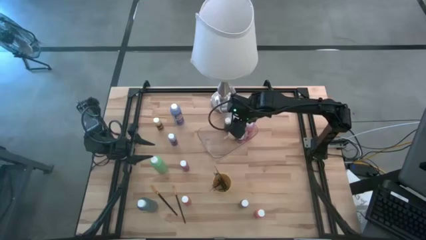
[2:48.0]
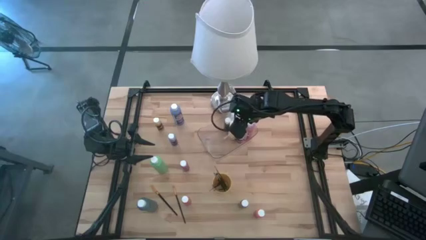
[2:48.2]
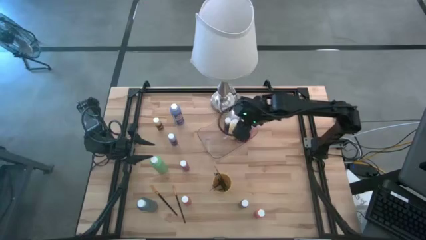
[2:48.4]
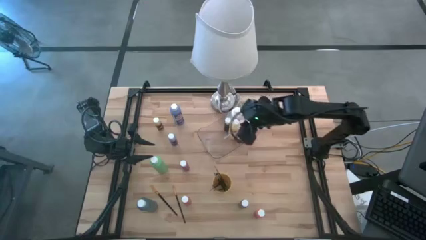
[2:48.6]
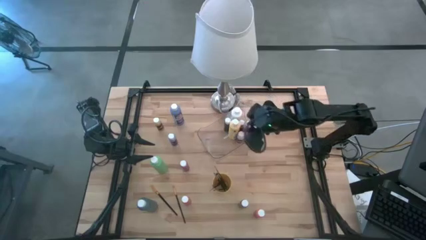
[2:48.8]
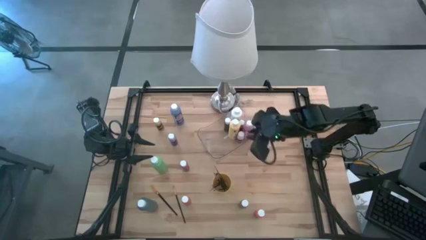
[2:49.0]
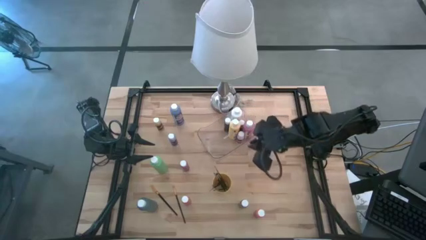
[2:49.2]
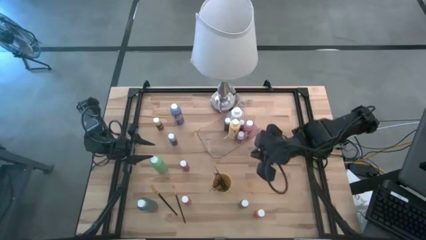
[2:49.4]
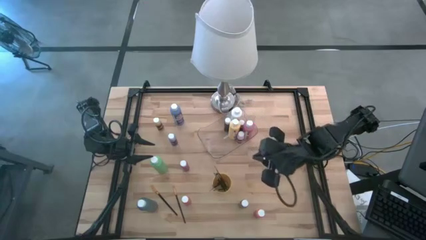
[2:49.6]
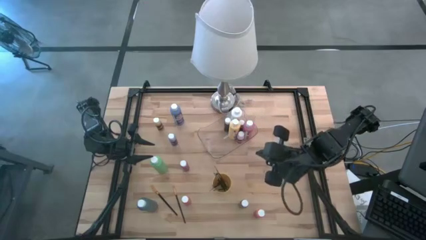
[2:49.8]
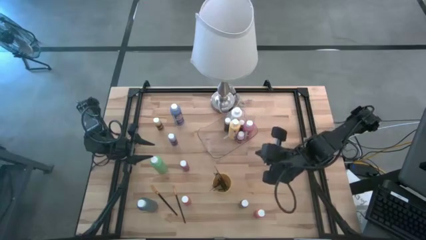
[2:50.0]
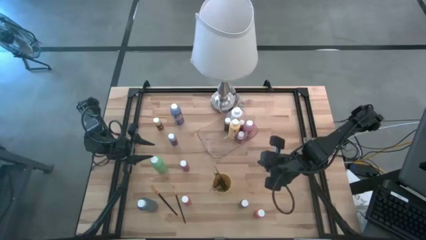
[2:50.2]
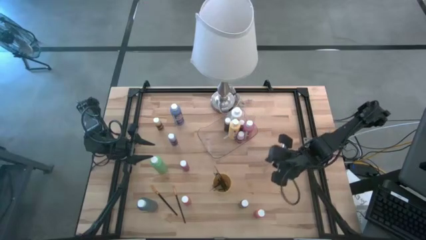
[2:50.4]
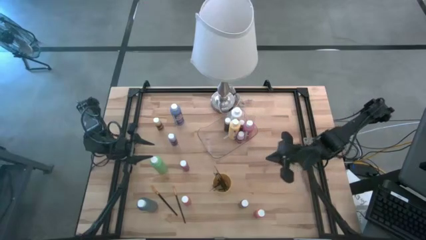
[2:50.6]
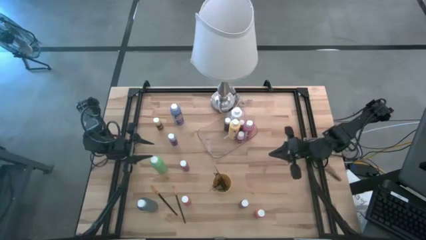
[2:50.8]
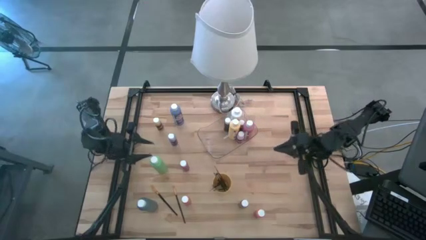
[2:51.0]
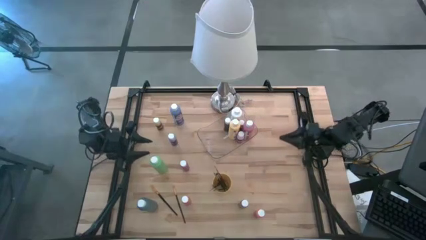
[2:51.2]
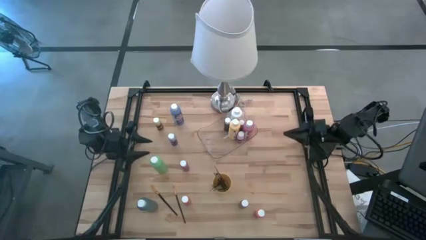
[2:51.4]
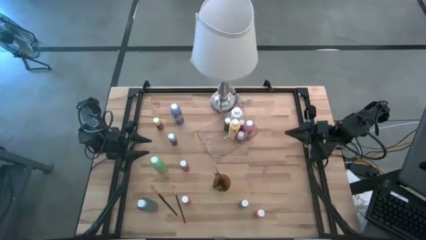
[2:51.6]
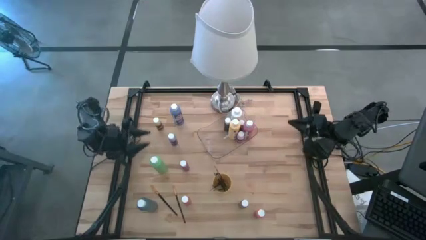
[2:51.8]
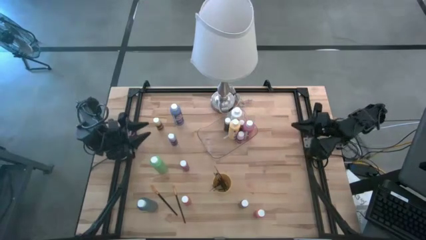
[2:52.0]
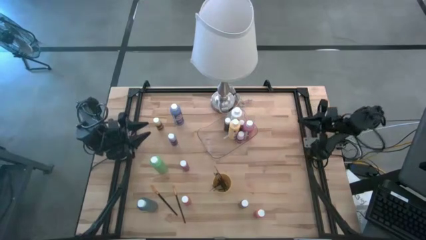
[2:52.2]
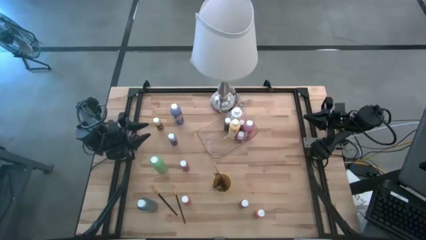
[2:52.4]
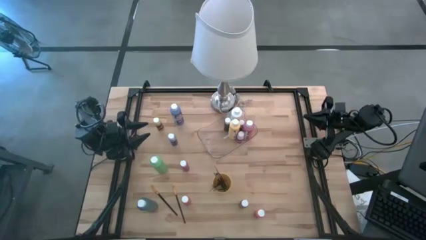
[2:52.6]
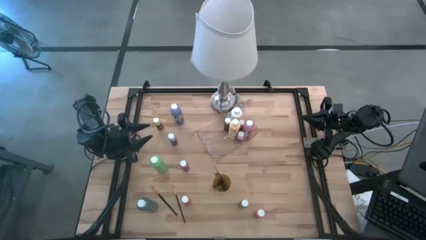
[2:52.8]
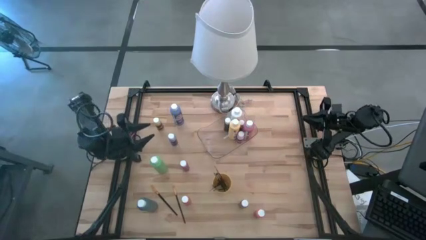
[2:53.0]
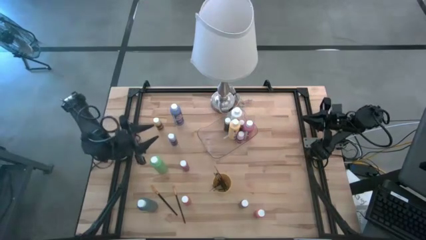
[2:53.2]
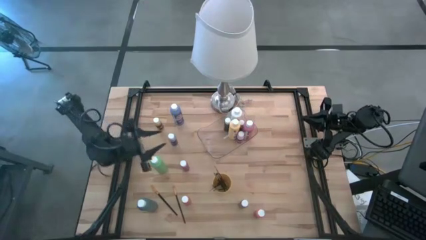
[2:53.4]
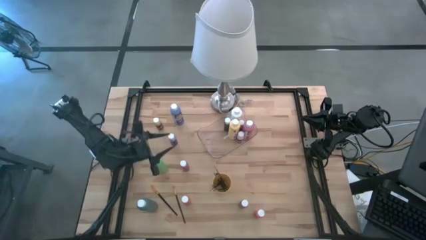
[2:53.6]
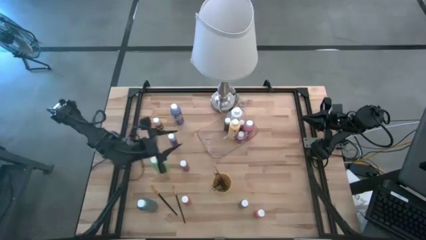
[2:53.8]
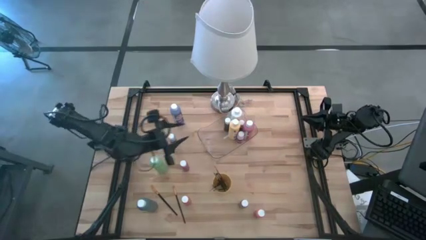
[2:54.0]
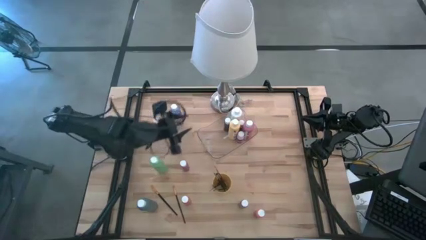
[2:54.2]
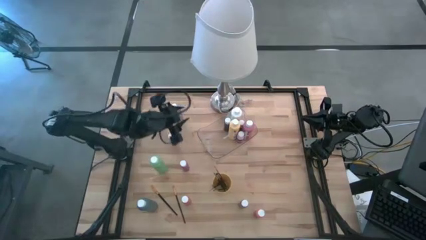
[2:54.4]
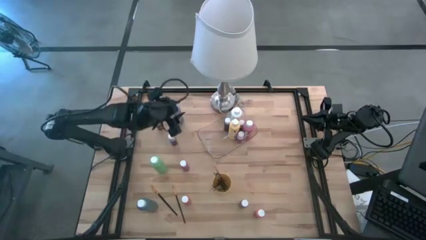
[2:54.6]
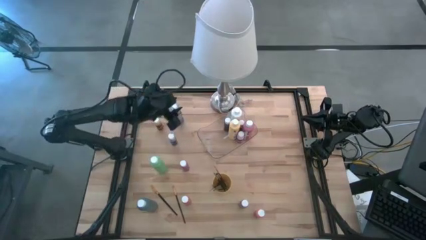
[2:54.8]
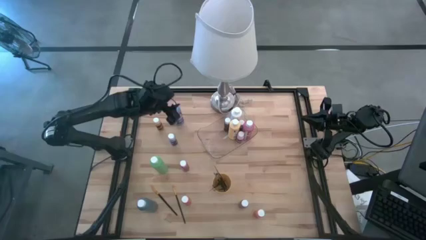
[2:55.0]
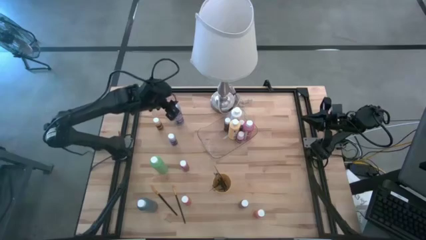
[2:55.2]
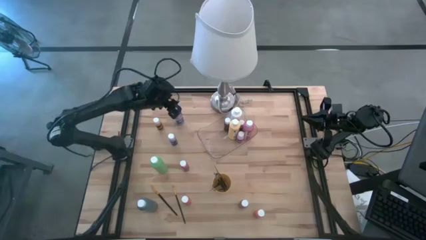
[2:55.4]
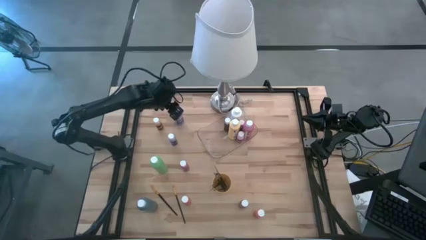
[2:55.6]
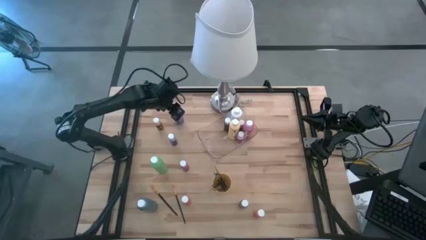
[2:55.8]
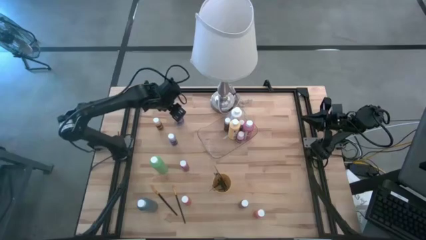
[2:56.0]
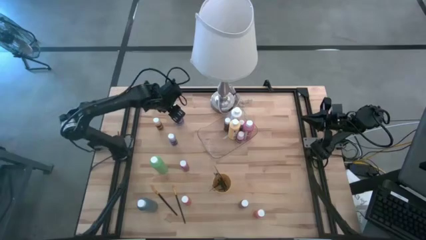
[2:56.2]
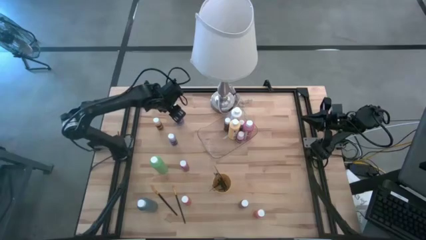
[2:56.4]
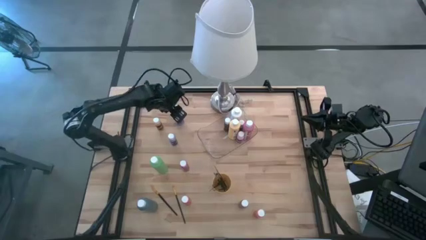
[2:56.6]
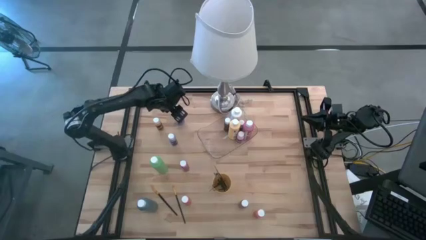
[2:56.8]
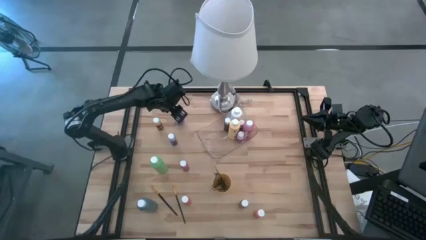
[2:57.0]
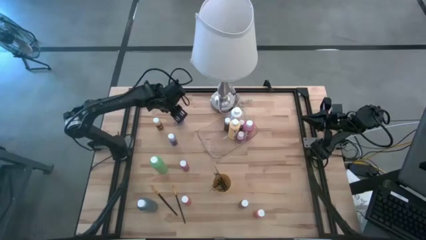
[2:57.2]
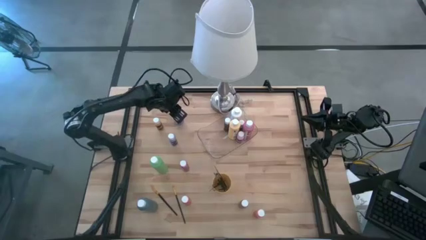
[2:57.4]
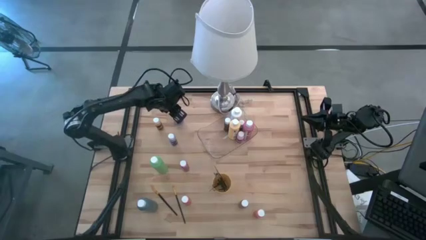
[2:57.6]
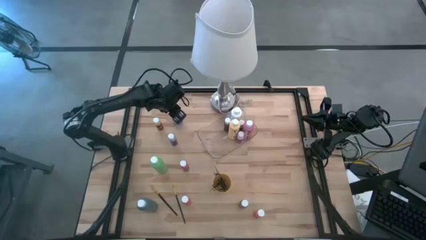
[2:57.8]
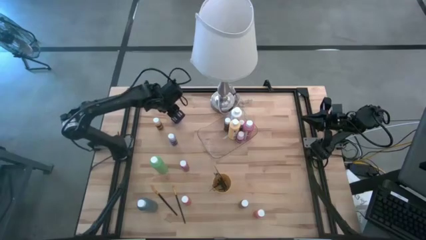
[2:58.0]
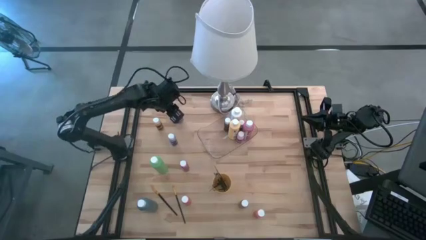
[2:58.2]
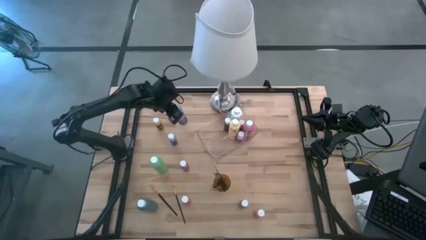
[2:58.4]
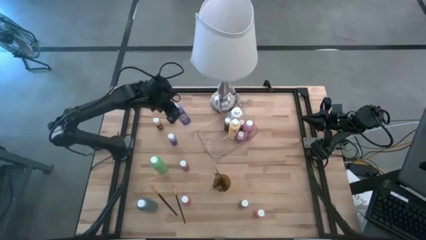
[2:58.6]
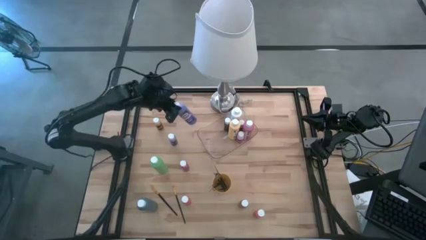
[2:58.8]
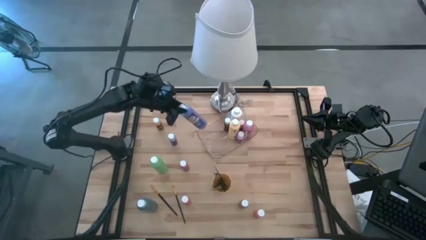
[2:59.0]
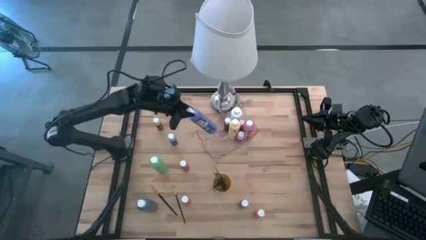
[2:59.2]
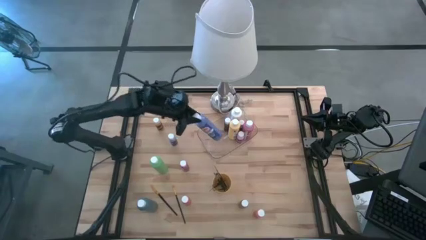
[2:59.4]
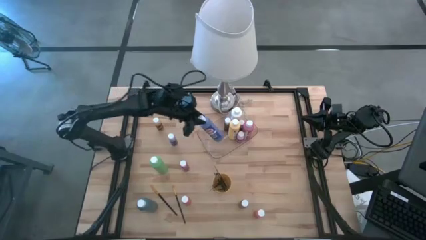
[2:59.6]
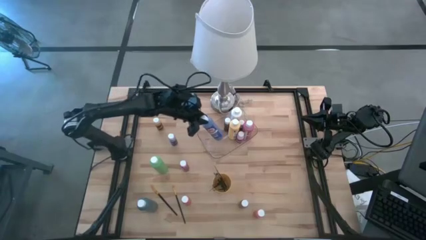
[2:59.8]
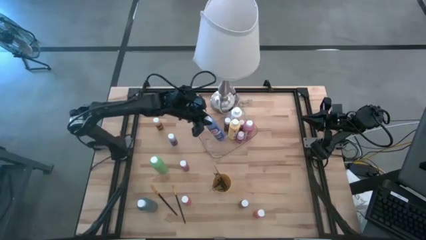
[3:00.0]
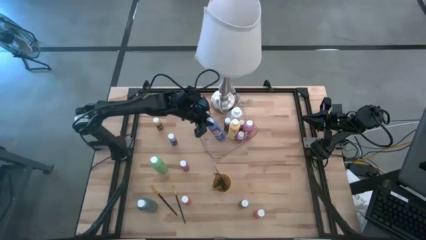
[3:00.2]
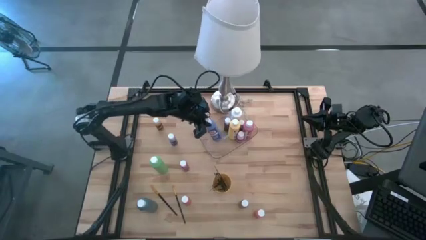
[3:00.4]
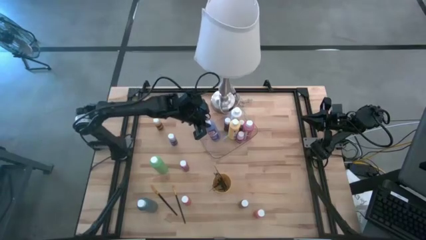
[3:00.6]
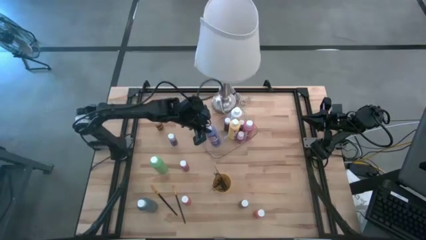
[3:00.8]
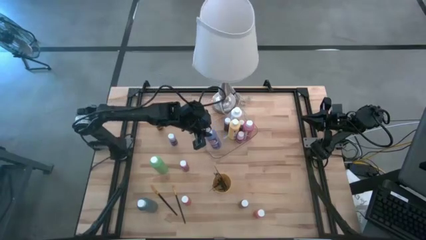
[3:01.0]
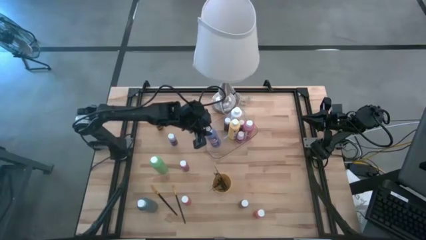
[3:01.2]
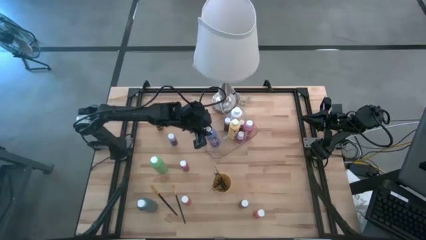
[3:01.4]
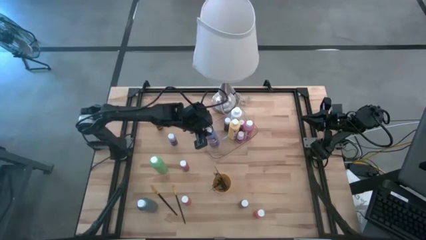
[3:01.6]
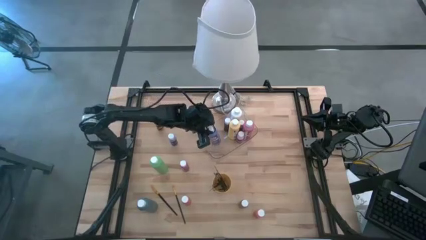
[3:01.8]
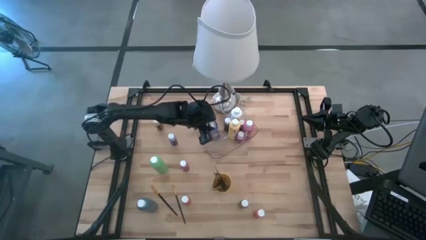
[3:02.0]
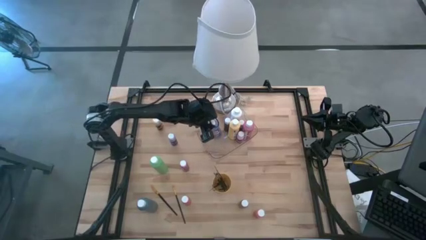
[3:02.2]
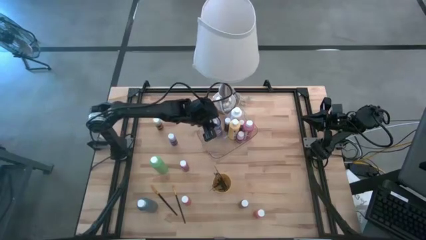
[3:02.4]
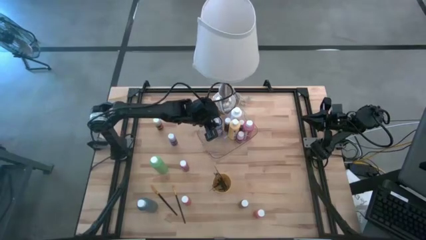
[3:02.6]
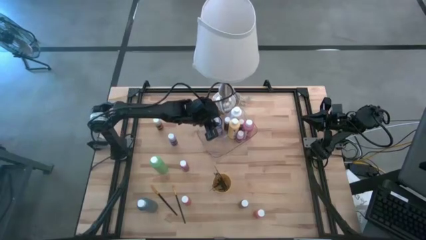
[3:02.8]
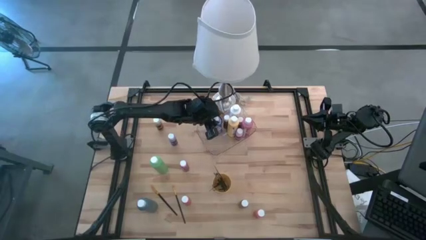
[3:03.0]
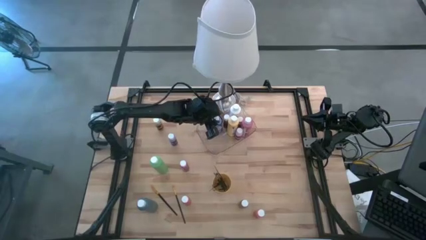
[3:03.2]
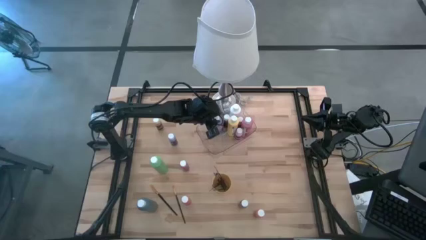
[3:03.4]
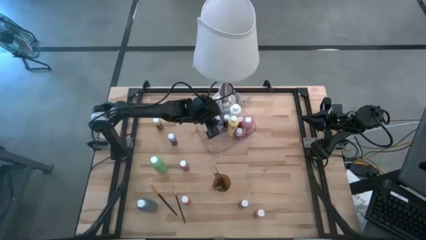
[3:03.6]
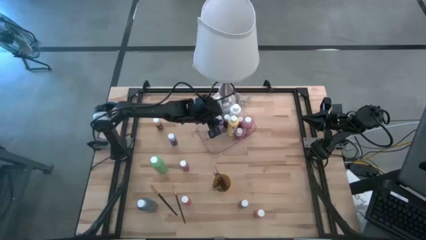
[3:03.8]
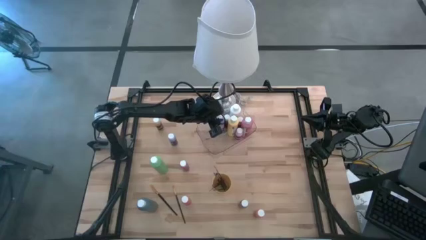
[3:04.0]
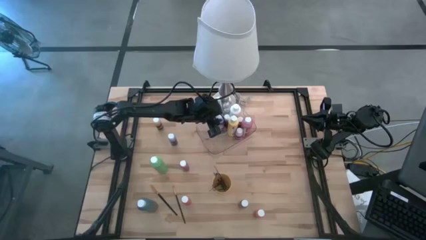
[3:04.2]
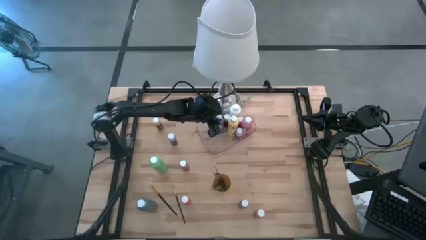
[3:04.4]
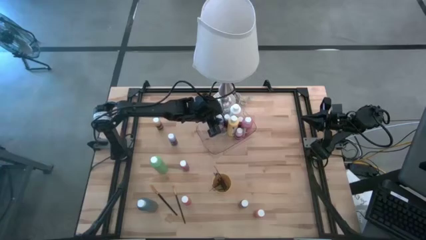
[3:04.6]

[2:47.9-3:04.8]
Task: Pick & Place Paint Supplies
Put the blue bottle into the transparent bin
